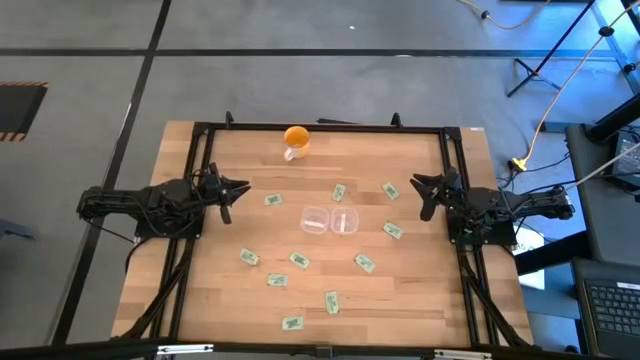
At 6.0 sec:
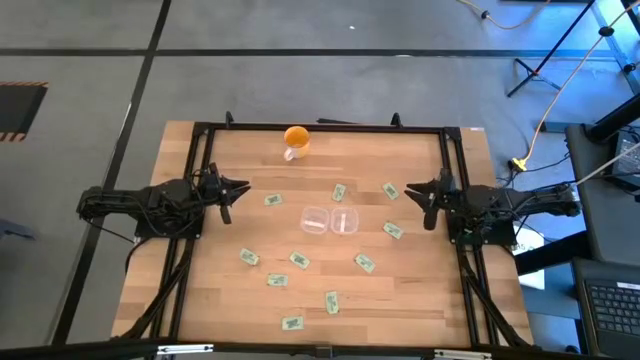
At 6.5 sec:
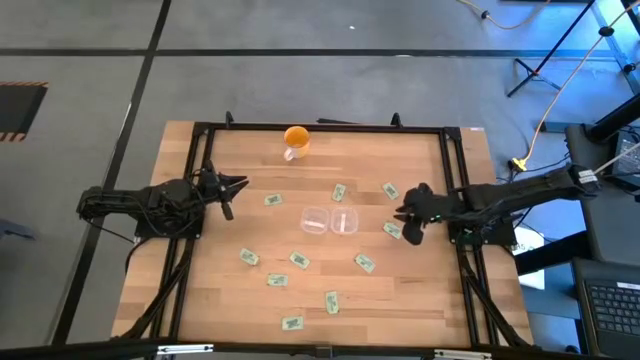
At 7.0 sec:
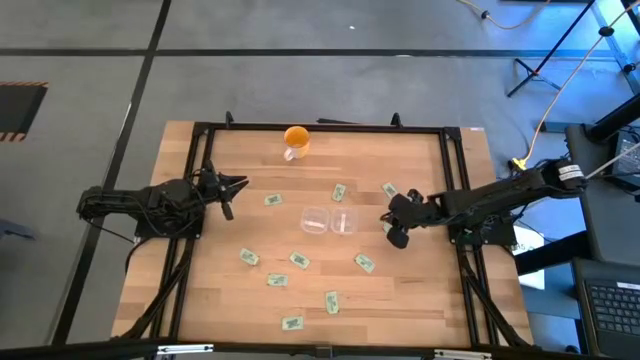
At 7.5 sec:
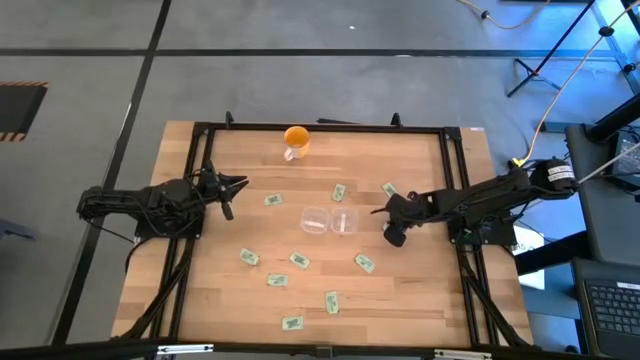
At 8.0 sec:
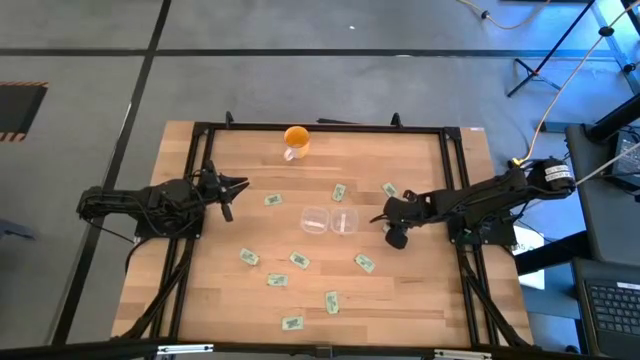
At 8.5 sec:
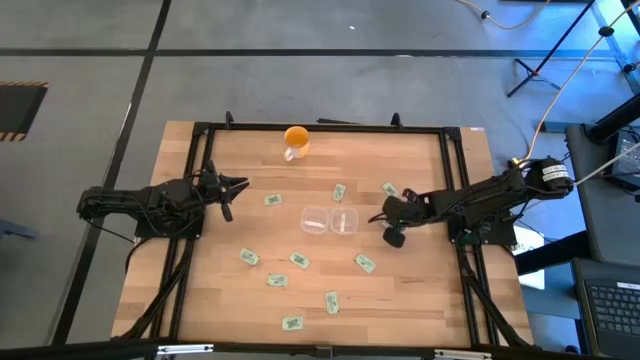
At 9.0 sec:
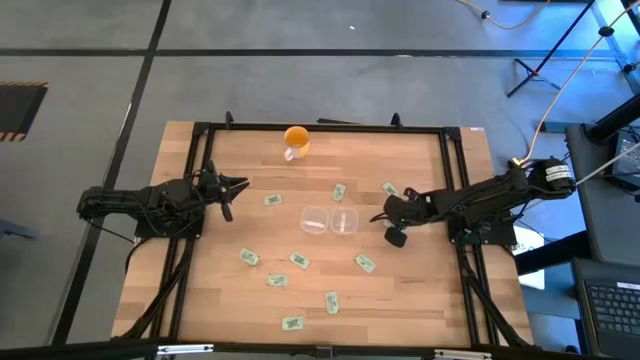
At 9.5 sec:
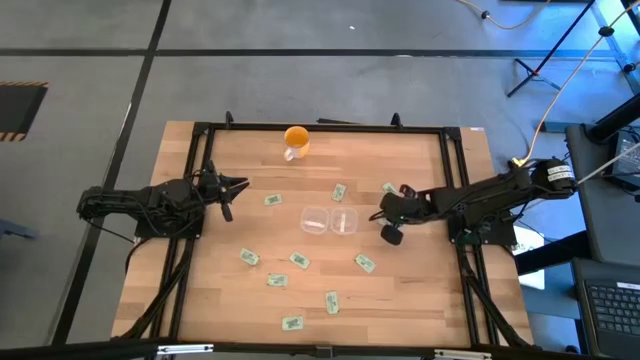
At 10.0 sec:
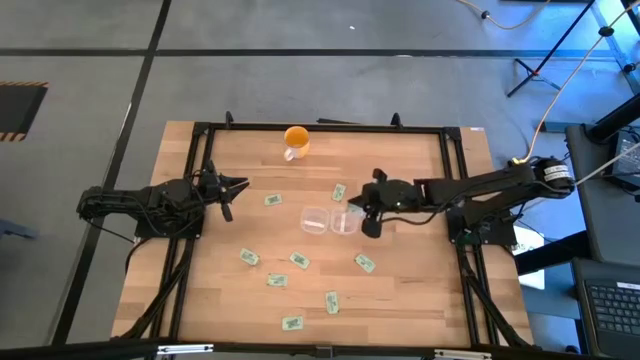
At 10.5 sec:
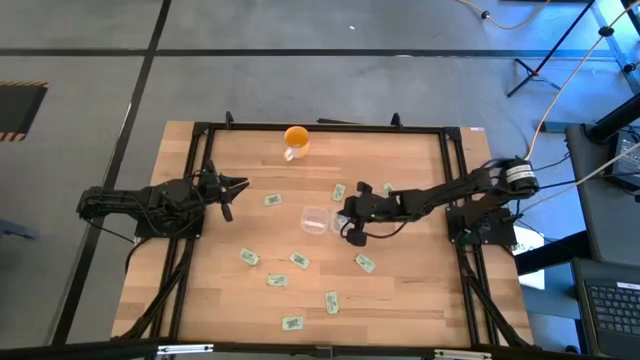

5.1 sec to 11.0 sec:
Task: Pick and place items into bin
Put the stevia packet into the right transparent bin

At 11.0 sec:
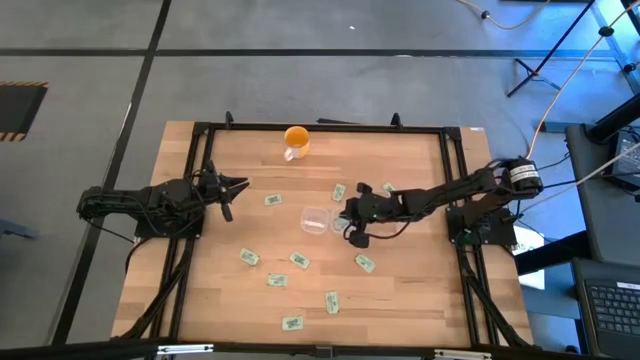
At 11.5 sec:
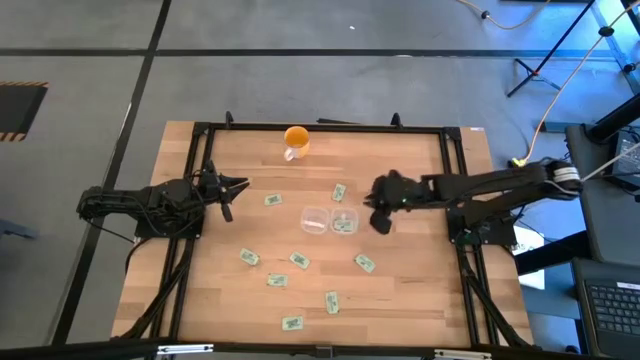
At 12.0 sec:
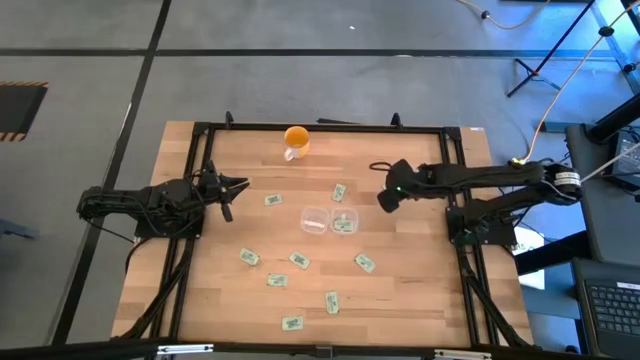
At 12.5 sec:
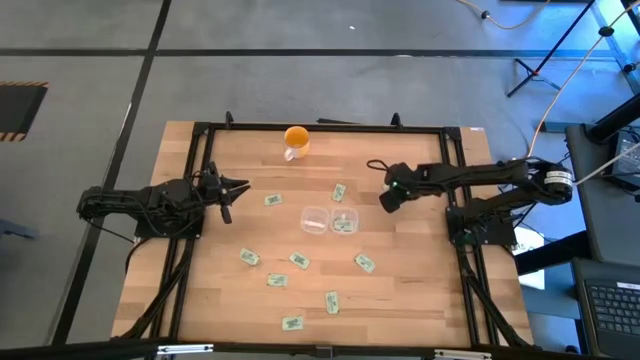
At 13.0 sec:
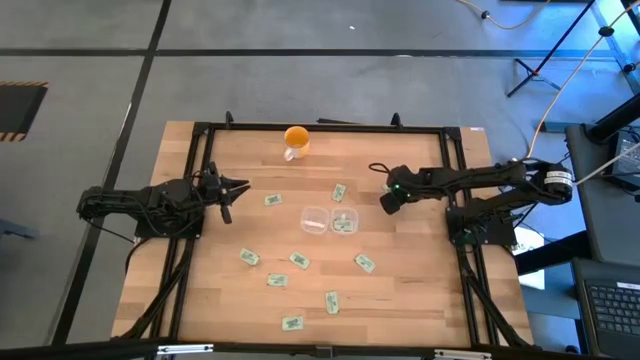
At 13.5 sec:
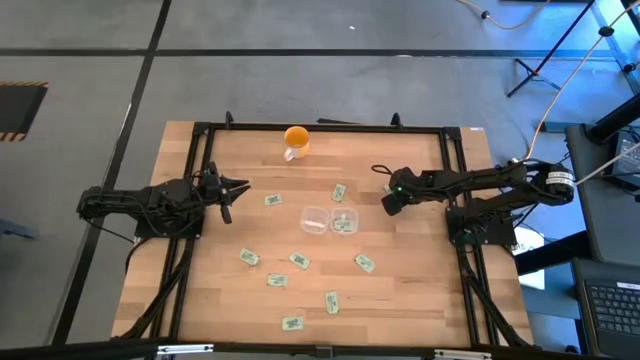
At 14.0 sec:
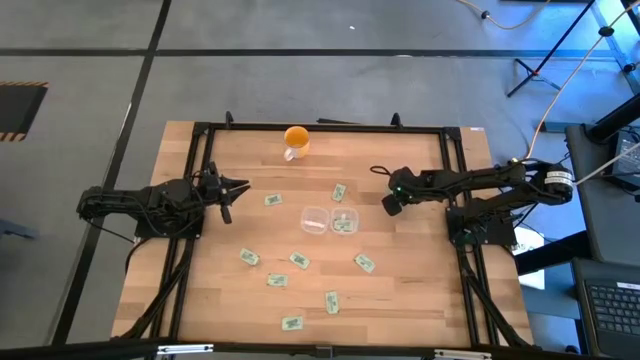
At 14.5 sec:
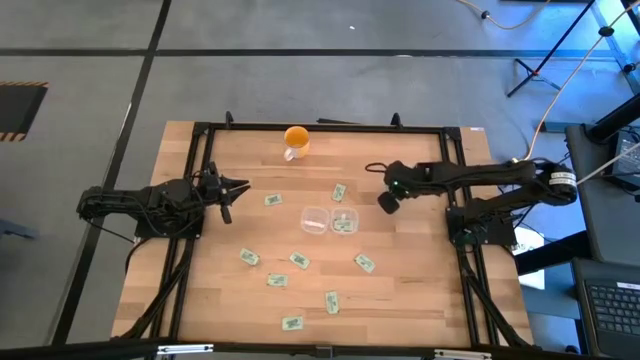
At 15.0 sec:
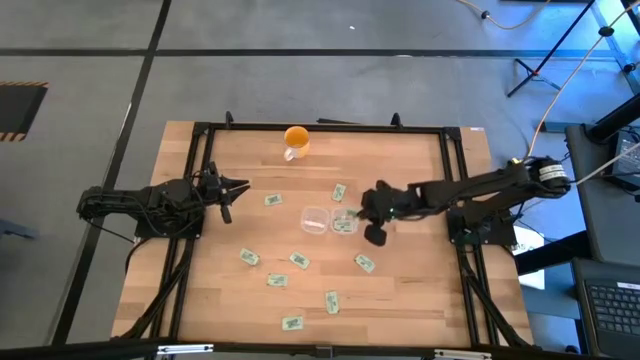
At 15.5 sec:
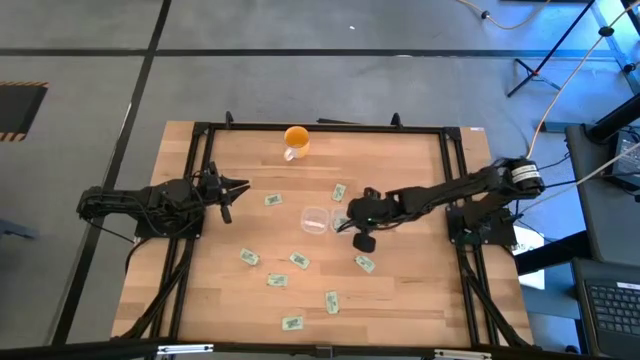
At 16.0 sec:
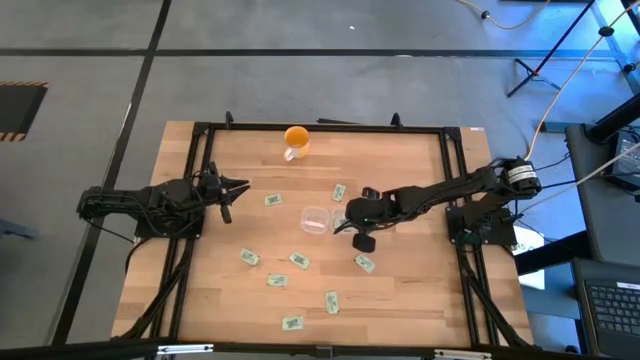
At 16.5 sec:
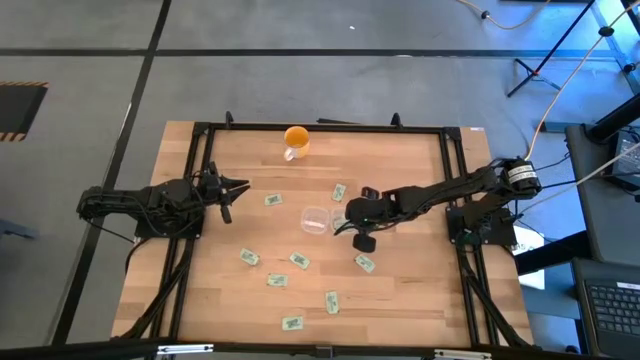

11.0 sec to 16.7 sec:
Put the stevia packet into the right transparent bin

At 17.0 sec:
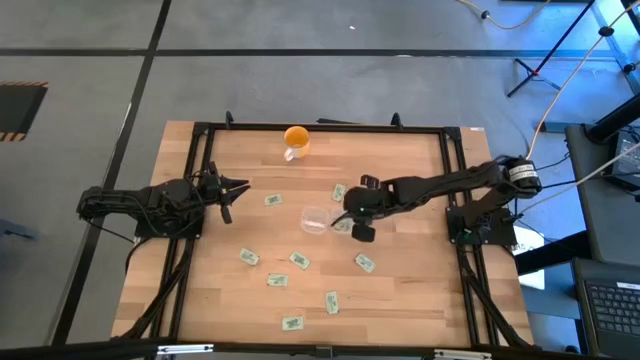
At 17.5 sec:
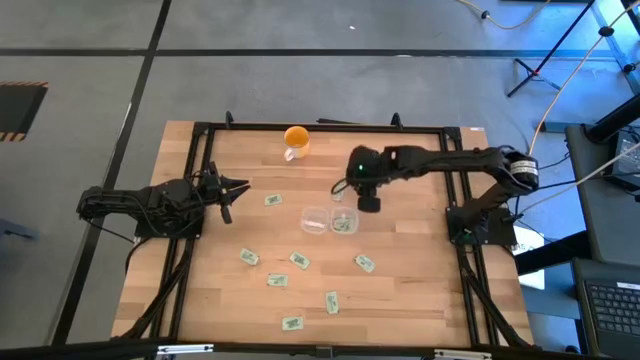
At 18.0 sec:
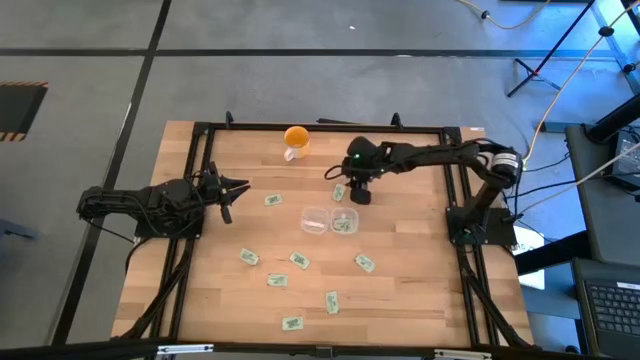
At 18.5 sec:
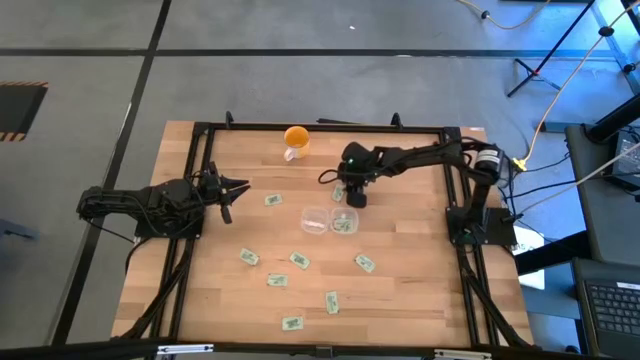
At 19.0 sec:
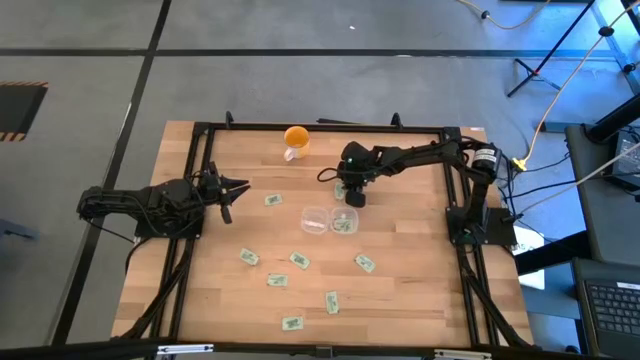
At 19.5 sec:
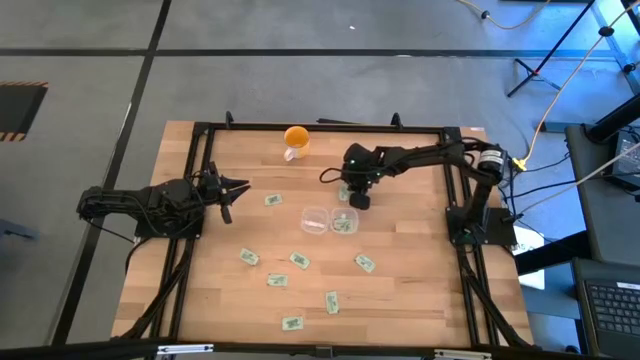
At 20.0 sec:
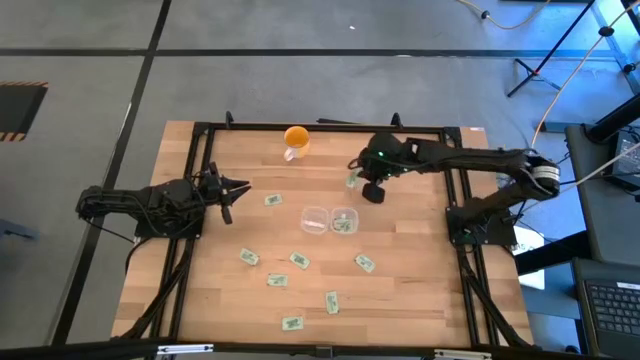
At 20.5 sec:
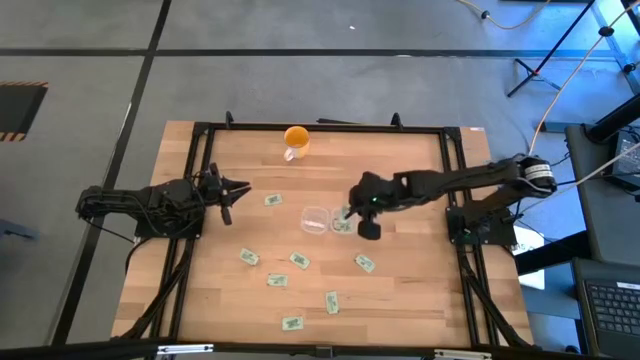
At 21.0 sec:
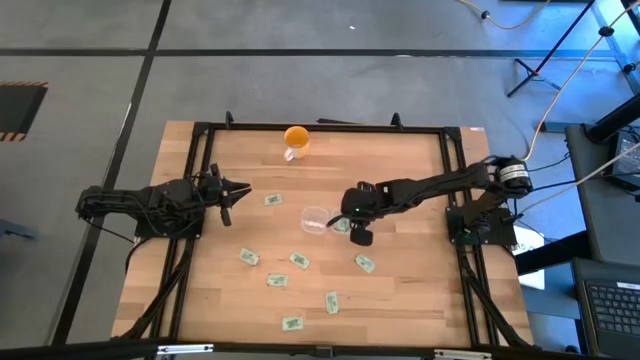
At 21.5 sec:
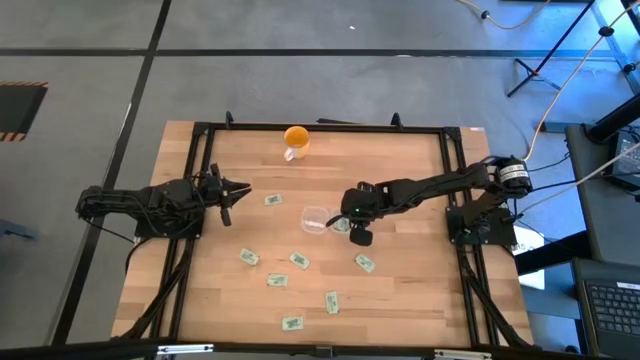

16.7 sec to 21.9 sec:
Put the stevia packet into the right transparent bin

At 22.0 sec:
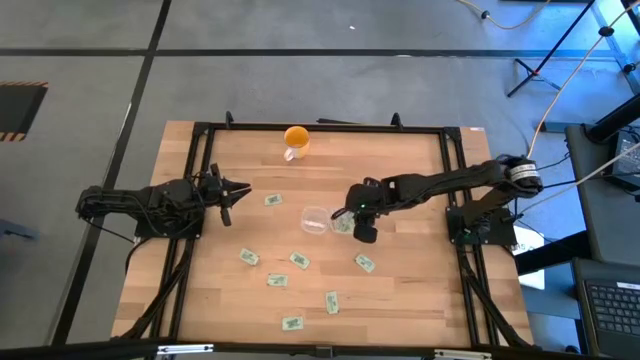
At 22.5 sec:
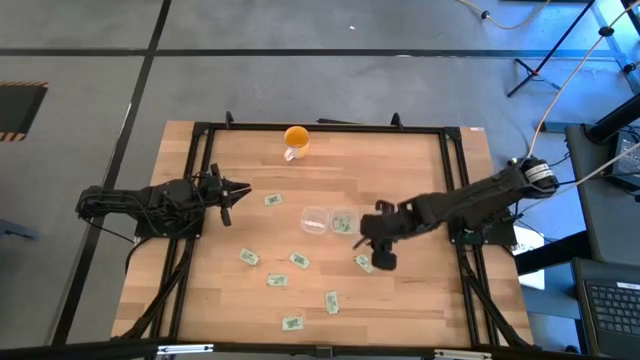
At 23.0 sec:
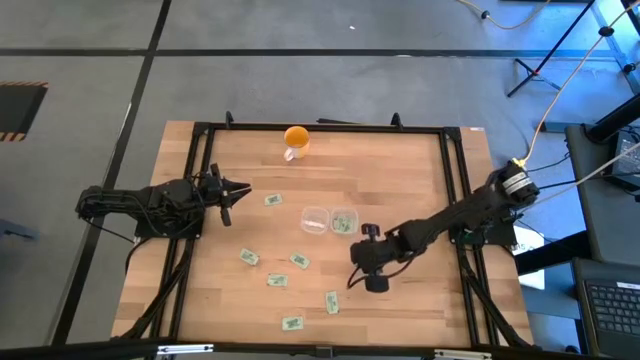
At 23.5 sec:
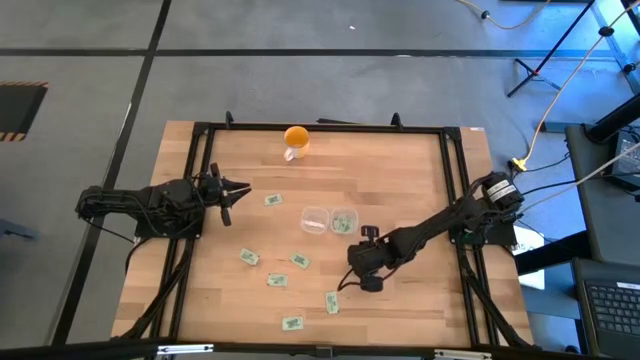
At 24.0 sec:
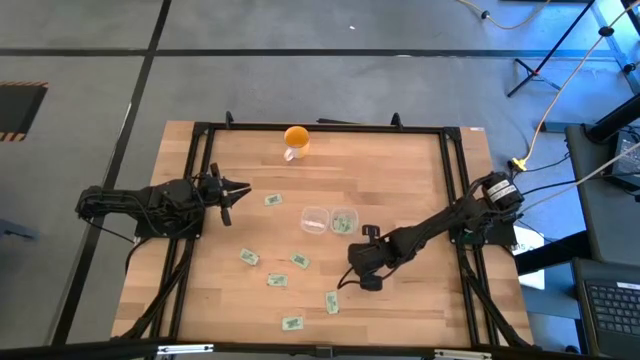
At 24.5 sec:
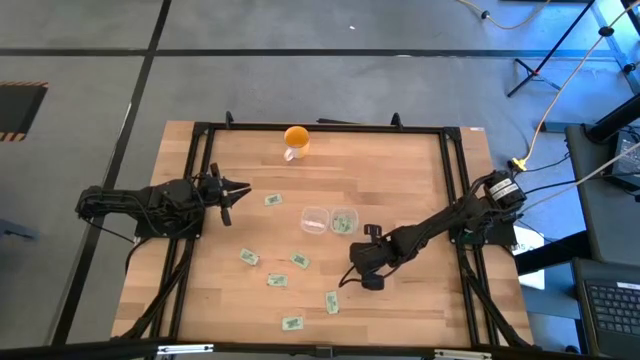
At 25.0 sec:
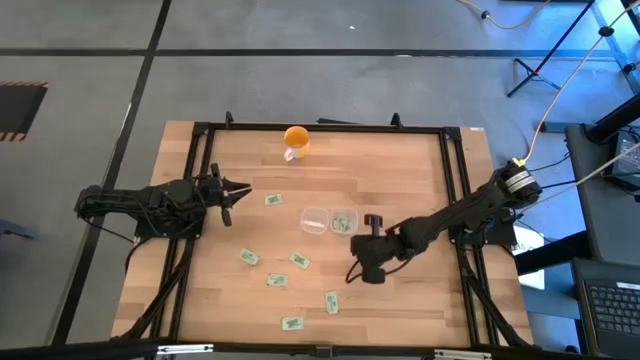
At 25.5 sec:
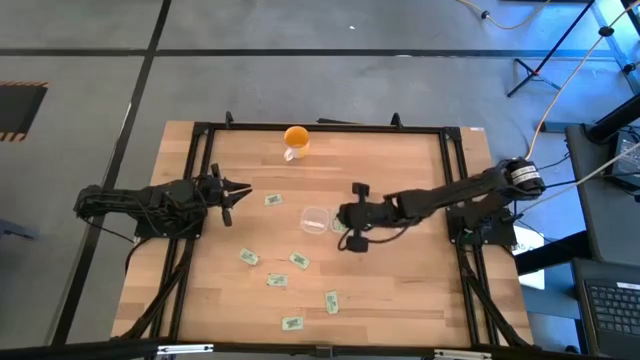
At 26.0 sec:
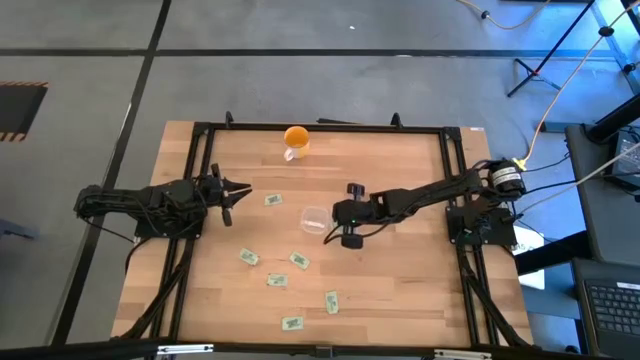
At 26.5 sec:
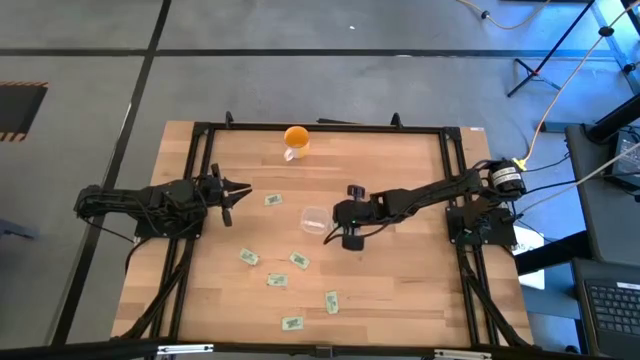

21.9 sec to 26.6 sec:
Put the stevia packet into the right transparent bin
